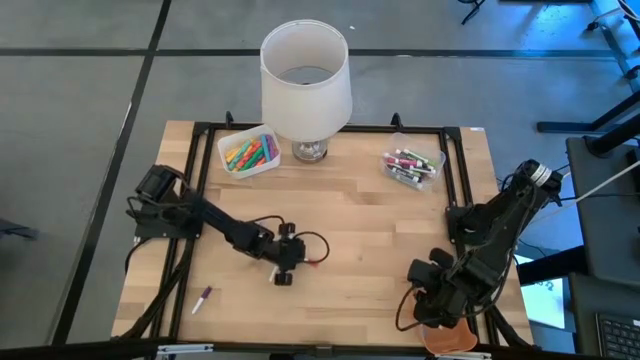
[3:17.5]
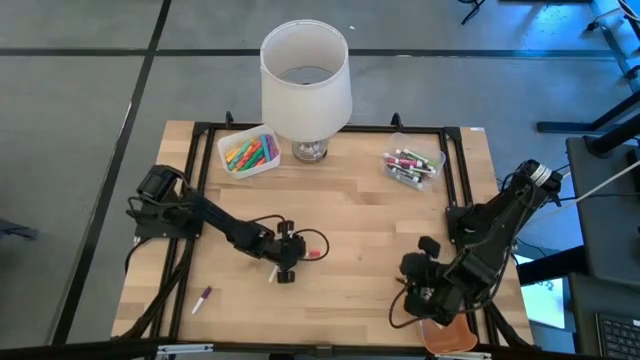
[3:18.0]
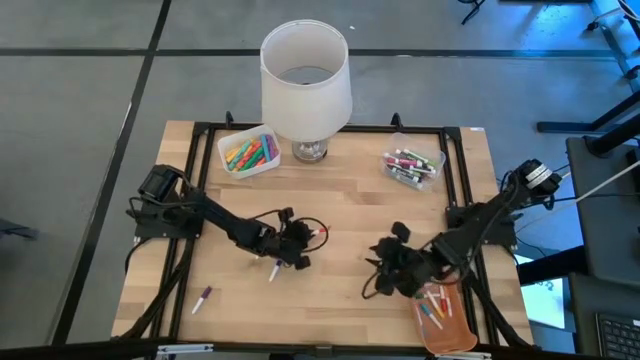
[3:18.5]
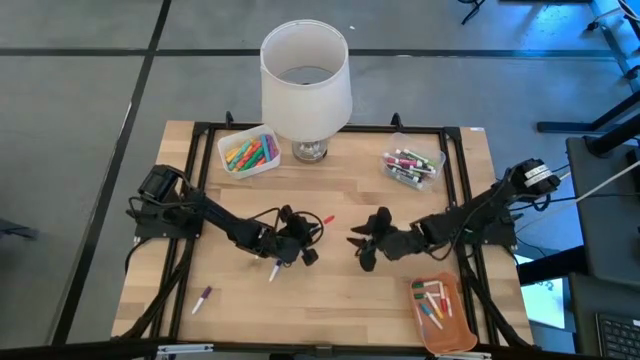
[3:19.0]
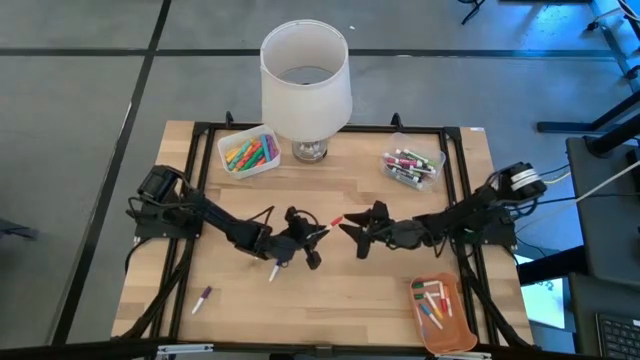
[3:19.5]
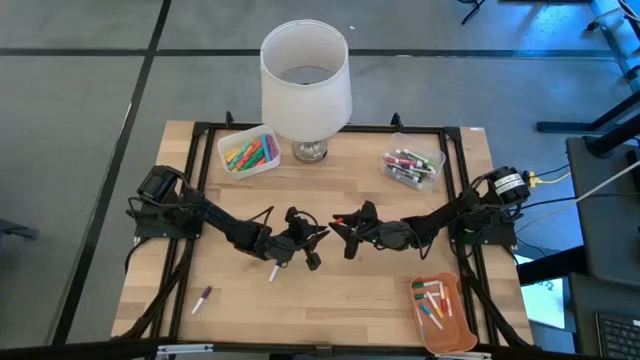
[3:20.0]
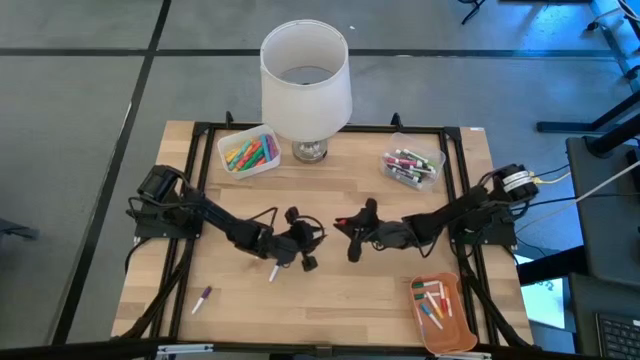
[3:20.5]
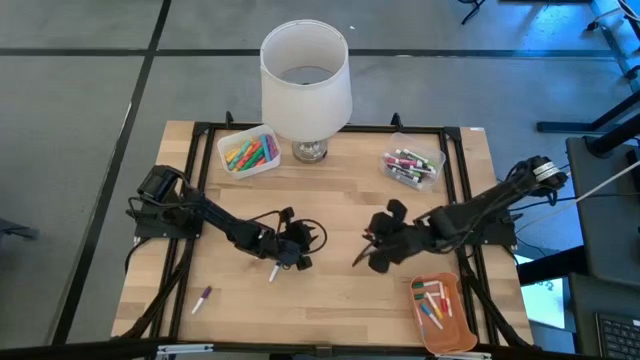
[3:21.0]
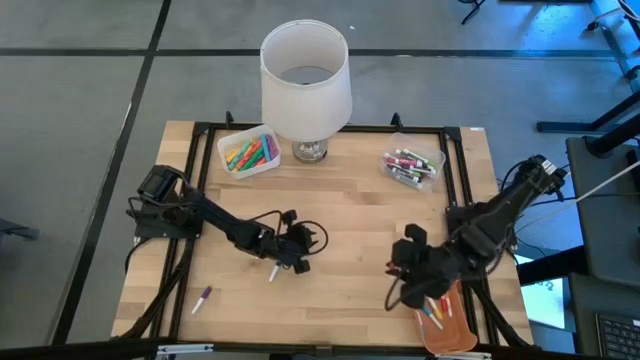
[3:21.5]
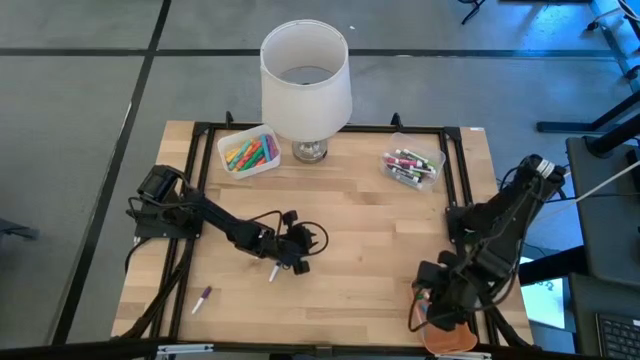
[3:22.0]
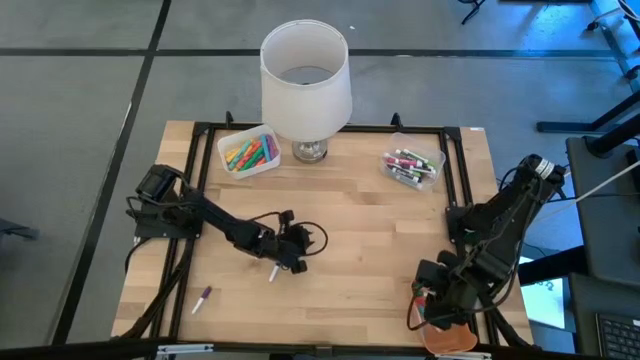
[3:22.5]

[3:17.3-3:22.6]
Task: Pick & Place Markers
Put the dark orange mini marker into the orange bin

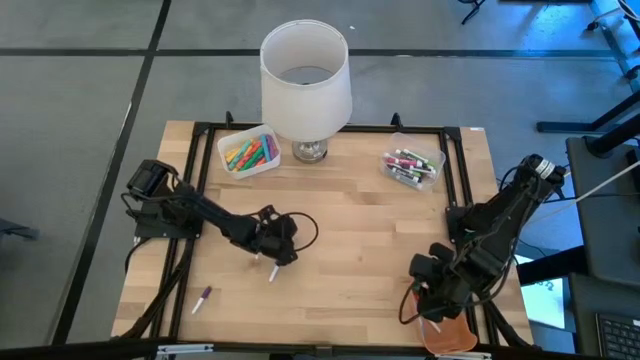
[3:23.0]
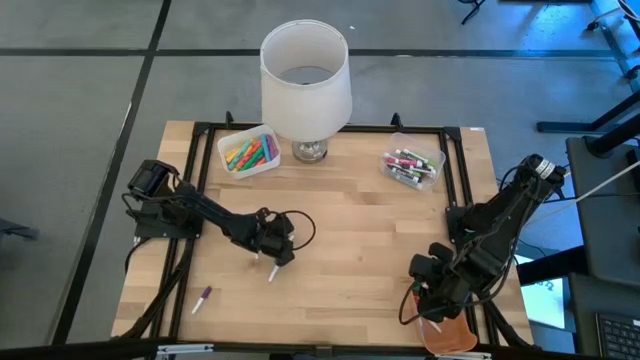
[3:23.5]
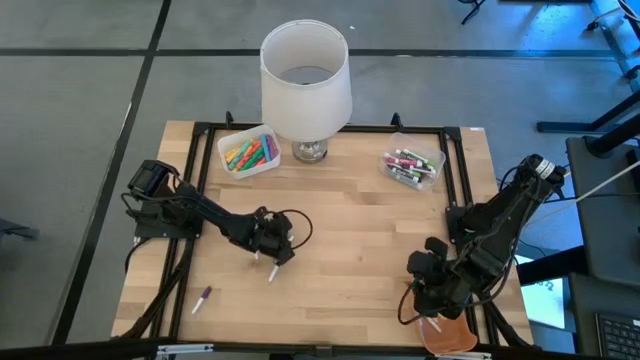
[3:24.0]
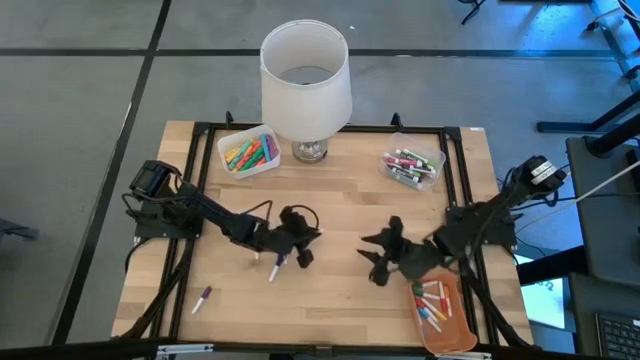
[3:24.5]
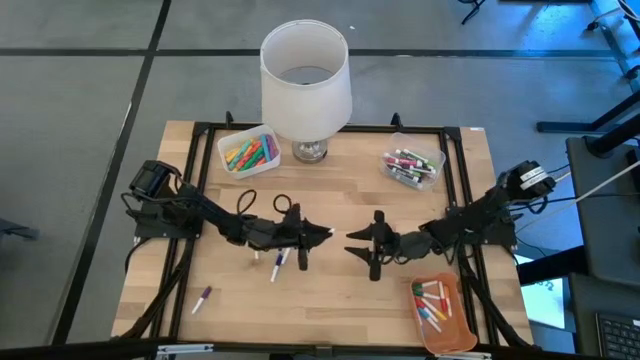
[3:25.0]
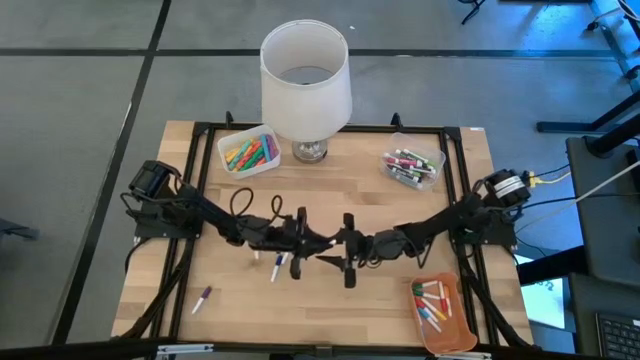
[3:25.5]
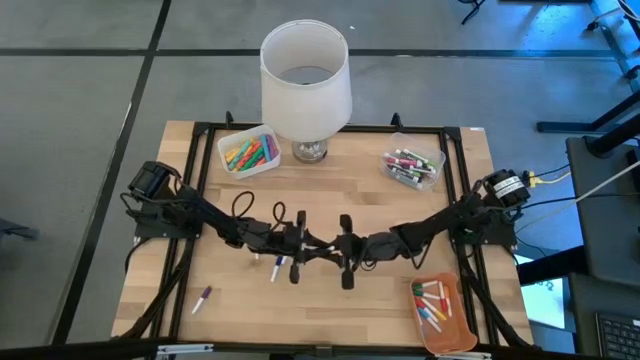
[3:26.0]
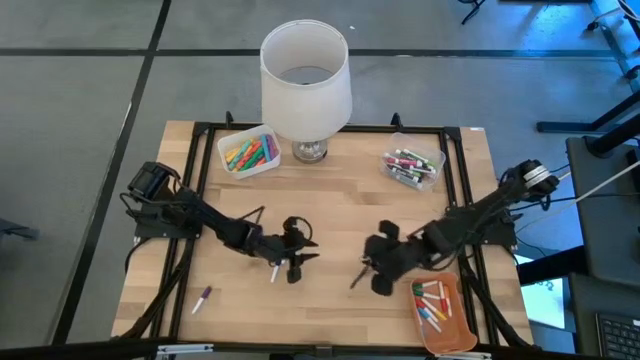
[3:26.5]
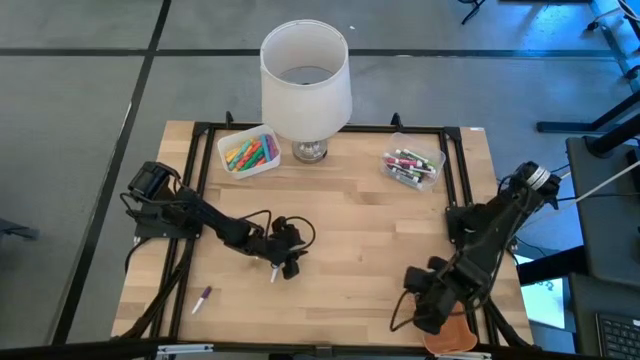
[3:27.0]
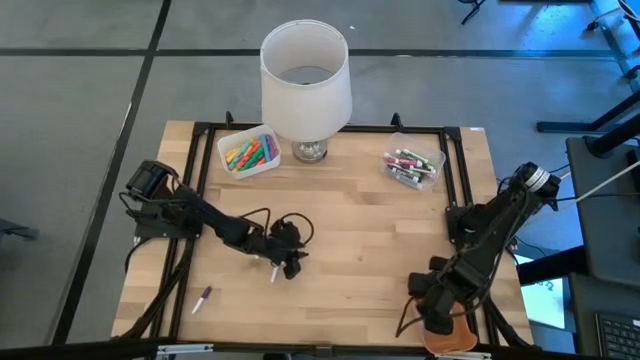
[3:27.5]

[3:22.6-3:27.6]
Put the dark blue mini marker into the orange bin

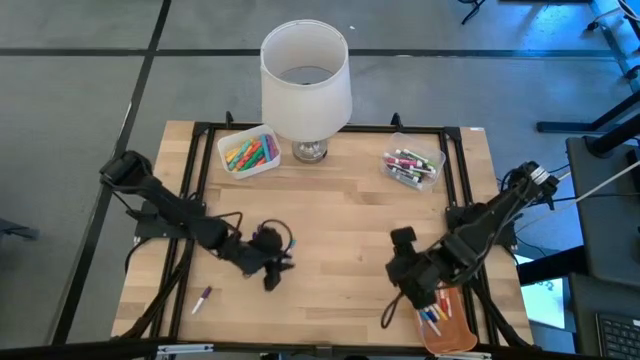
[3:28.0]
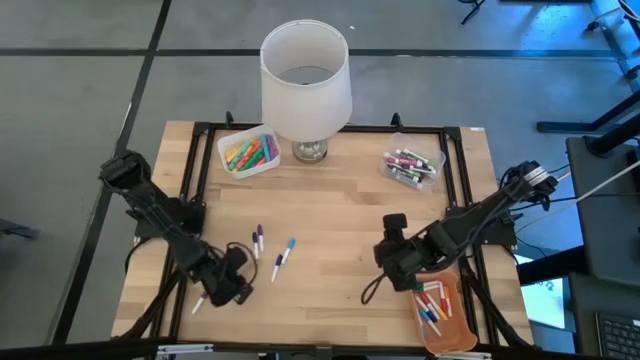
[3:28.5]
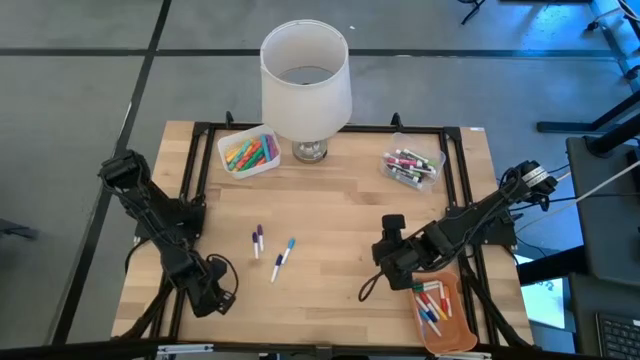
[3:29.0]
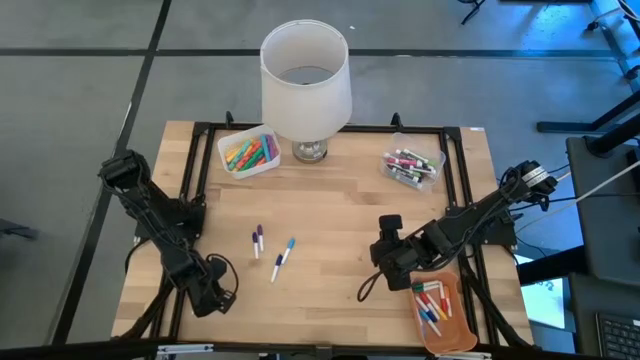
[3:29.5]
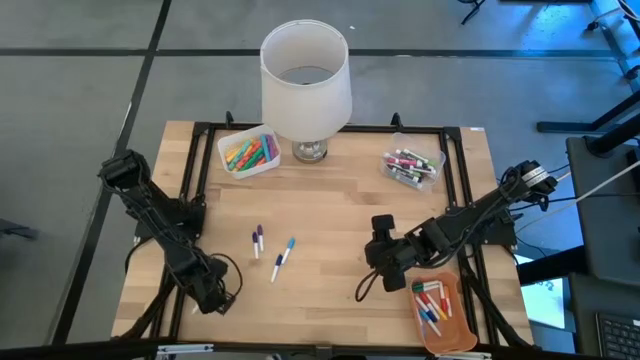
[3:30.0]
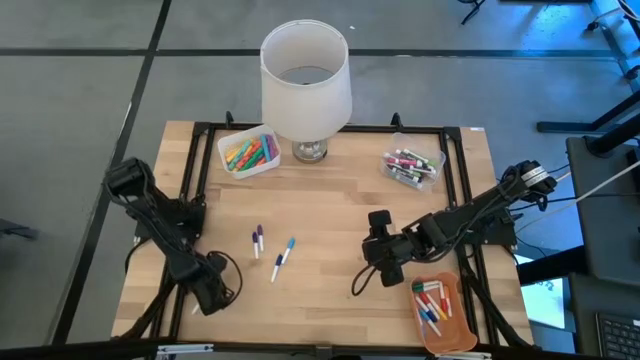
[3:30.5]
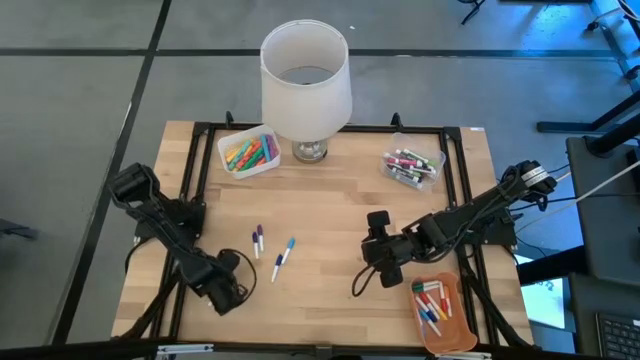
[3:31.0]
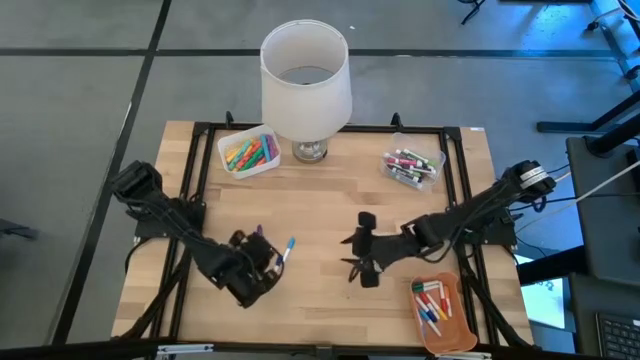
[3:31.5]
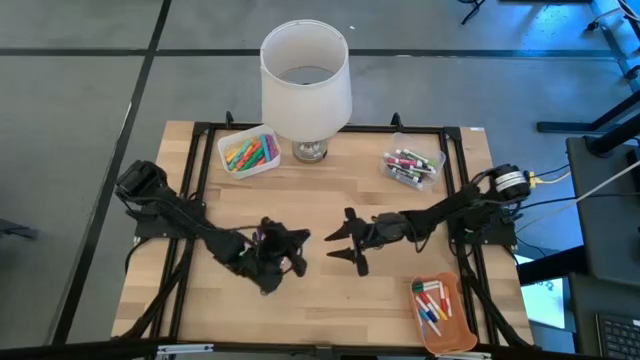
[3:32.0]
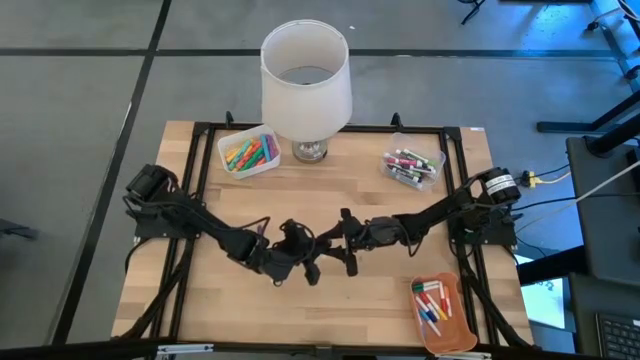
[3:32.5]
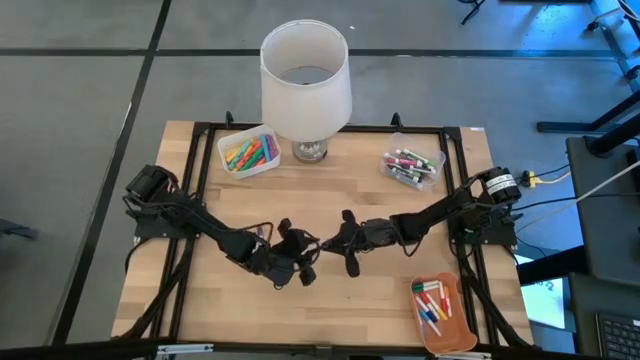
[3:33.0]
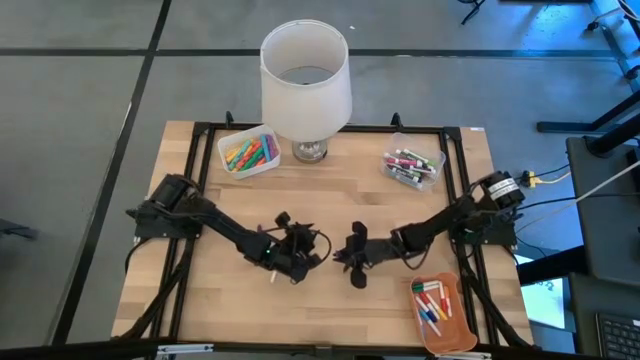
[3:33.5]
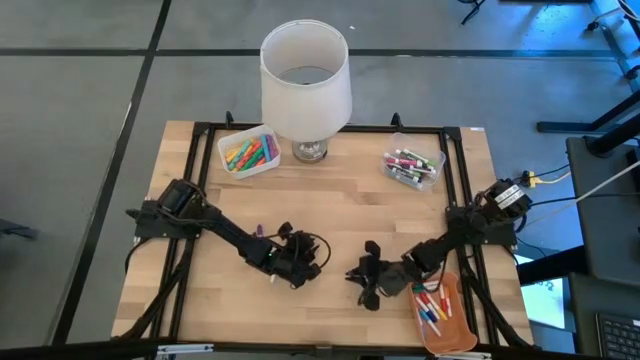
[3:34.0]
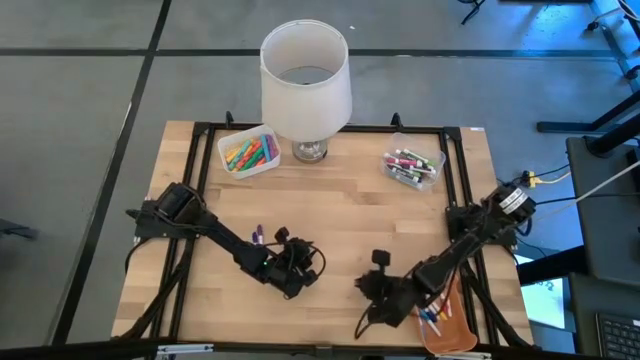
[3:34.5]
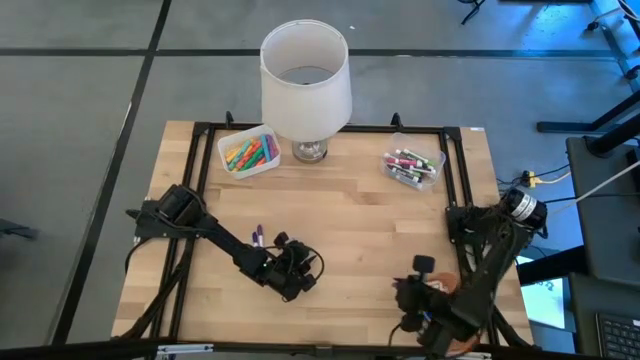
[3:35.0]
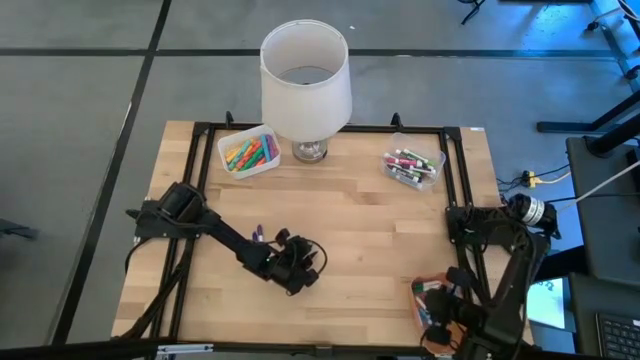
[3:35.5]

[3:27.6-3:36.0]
Put the dark blue mini marker into the orange bin

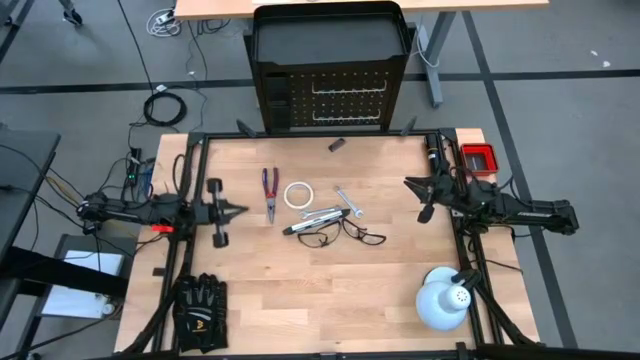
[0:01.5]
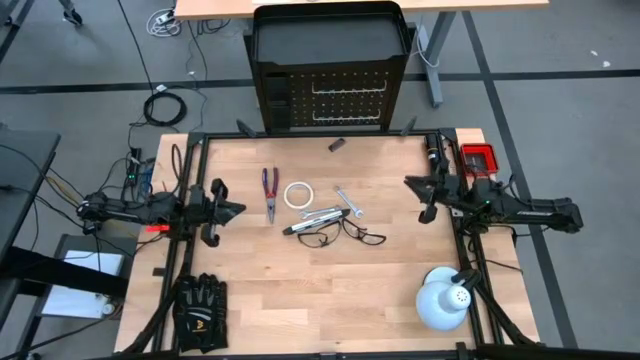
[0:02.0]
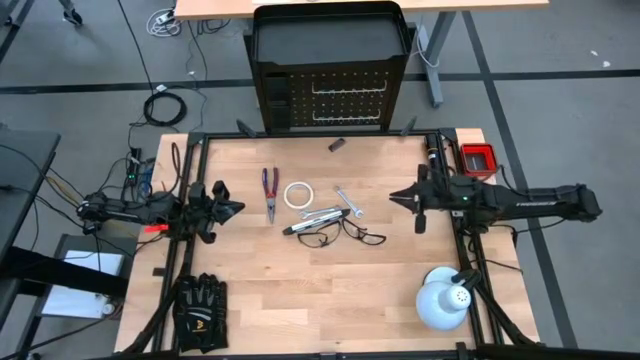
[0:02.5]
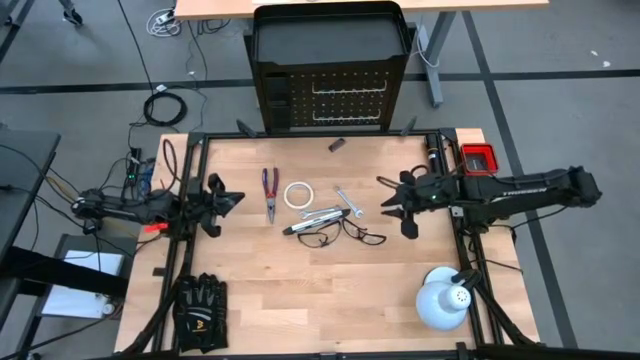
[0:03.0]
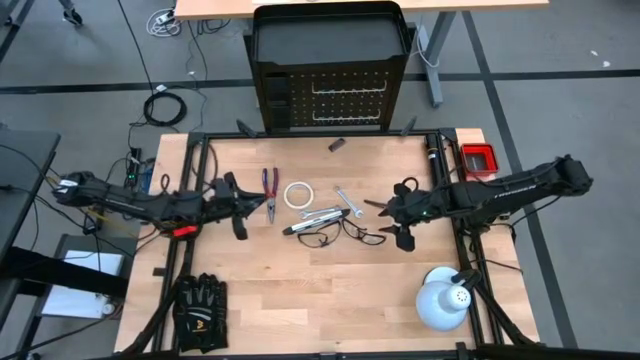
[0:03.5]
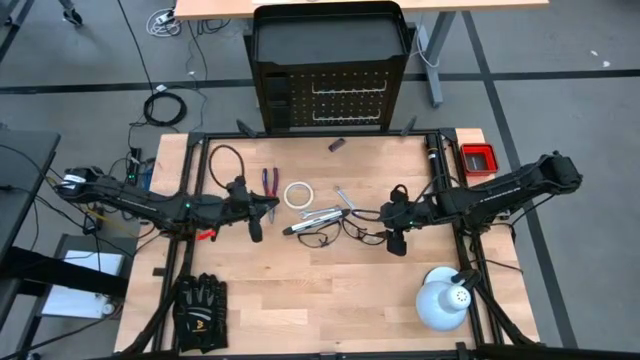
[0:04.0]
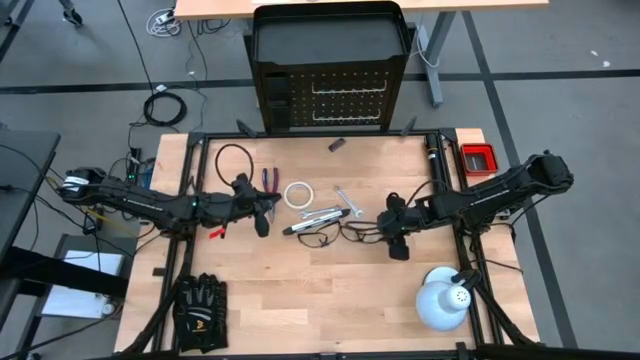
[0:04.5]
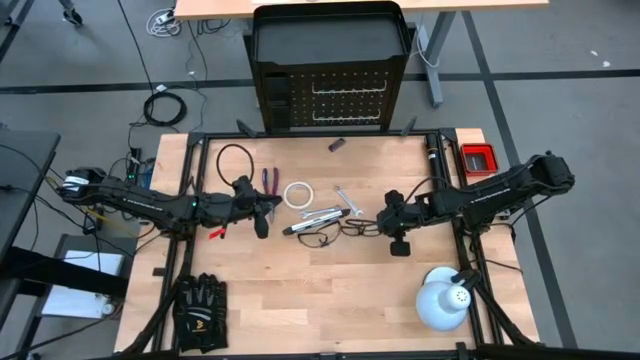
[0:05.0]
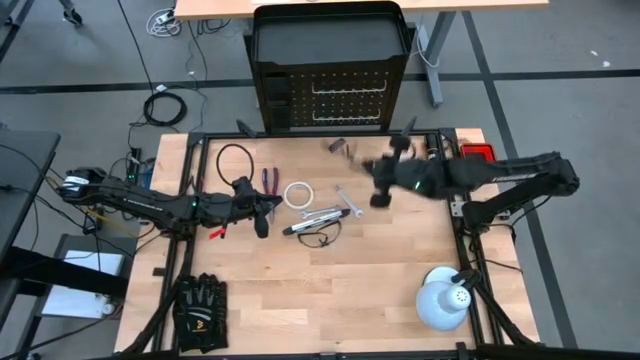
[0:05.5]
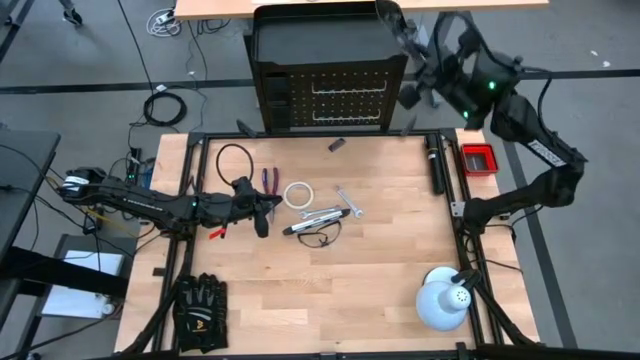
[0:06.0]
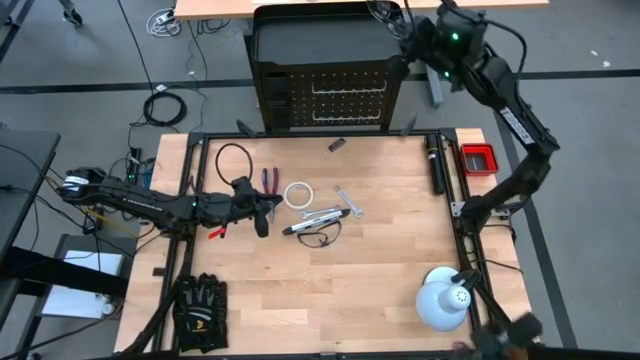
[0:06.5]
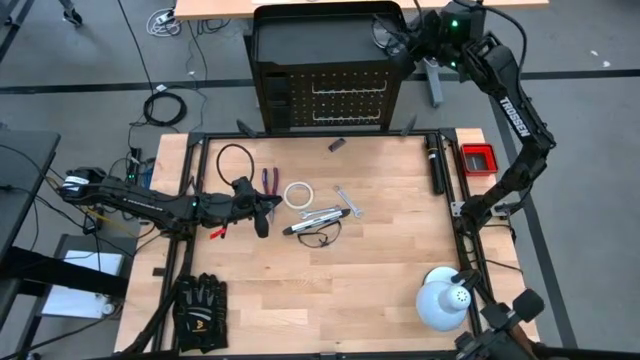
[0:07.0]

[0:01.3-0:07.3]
Task: Hang tools onto peg board
Put the right black safety glass on top of the peg board
